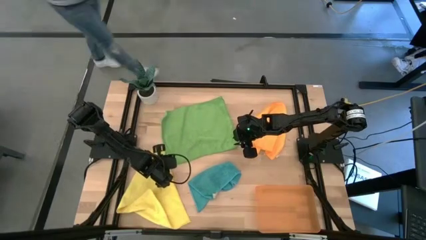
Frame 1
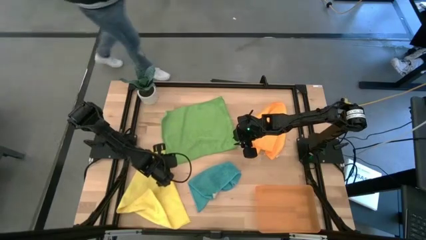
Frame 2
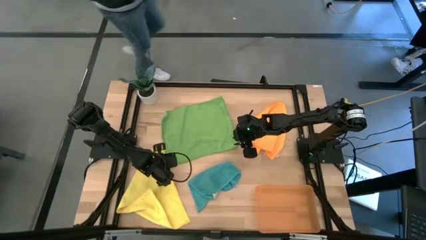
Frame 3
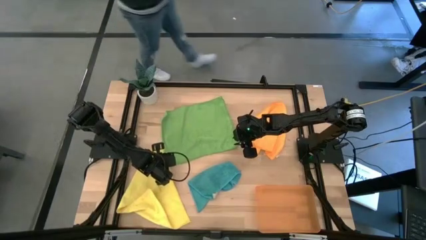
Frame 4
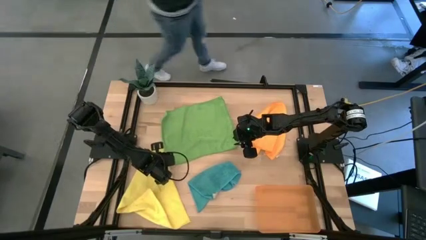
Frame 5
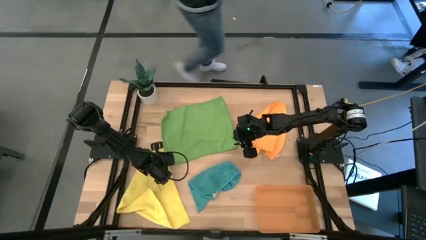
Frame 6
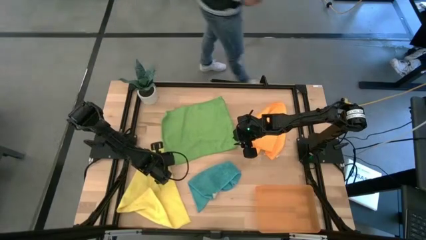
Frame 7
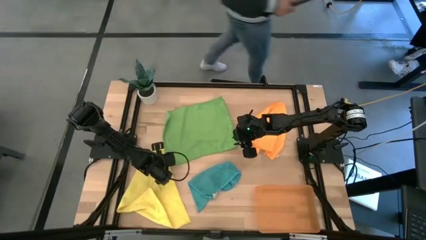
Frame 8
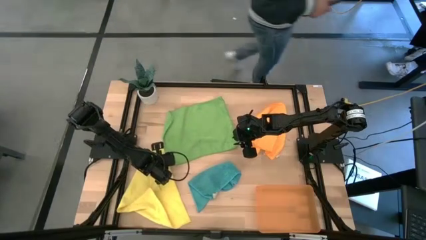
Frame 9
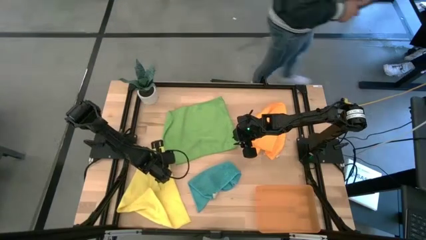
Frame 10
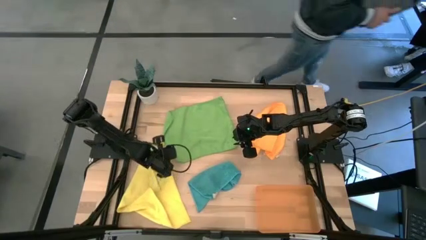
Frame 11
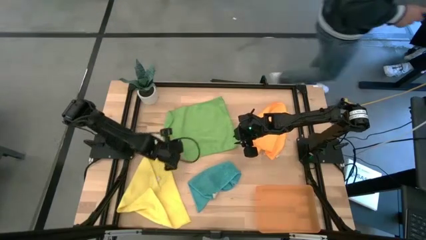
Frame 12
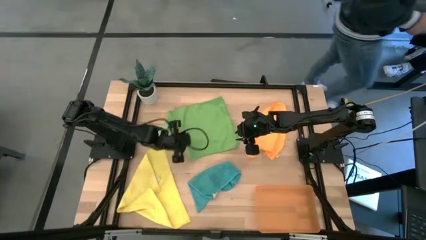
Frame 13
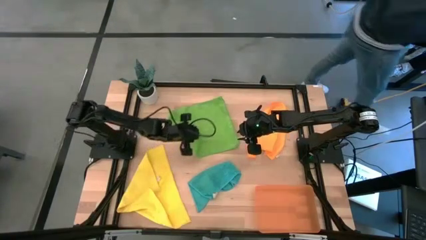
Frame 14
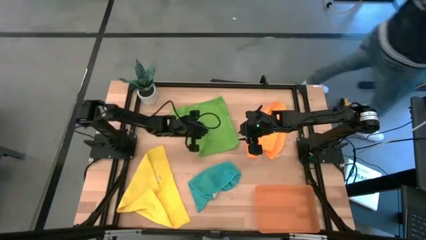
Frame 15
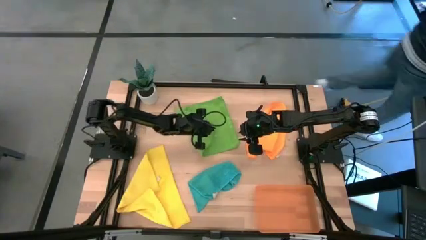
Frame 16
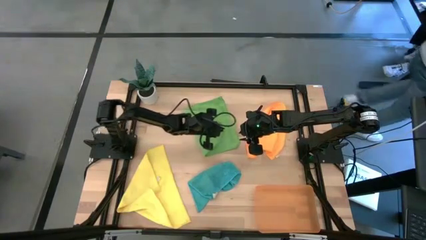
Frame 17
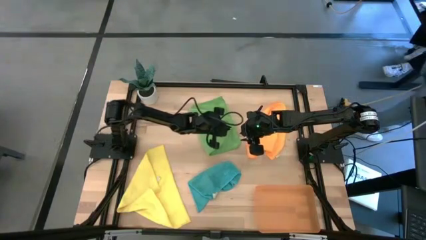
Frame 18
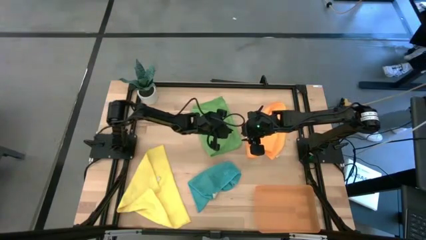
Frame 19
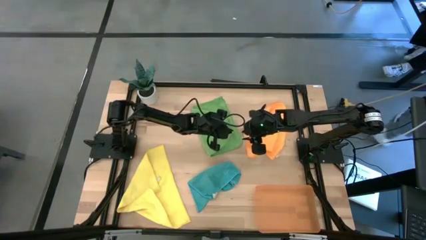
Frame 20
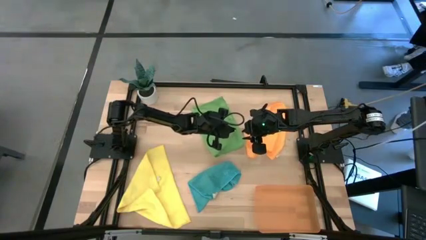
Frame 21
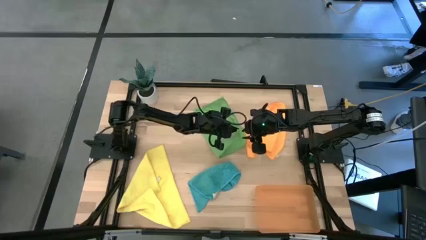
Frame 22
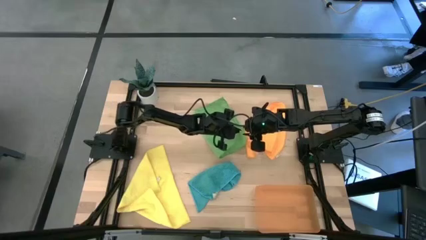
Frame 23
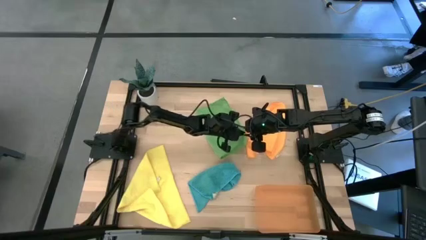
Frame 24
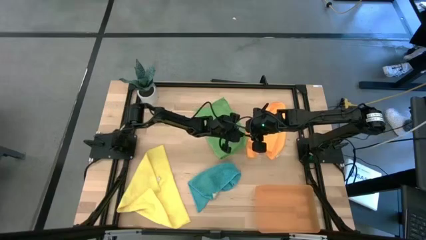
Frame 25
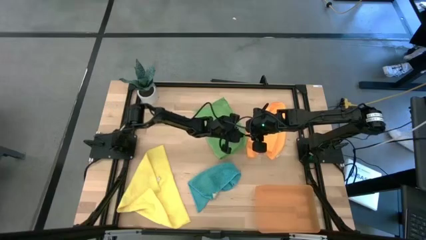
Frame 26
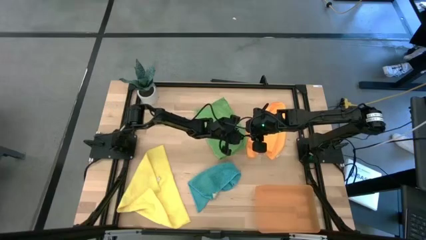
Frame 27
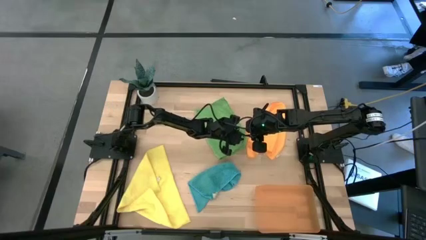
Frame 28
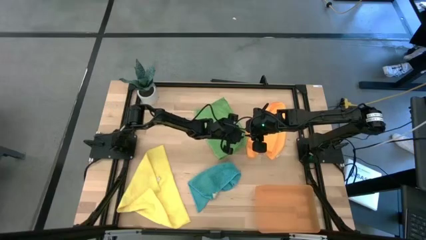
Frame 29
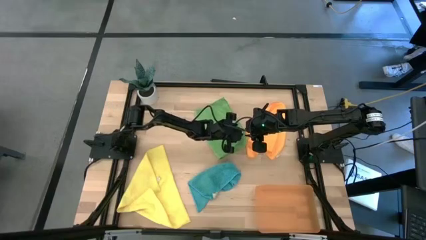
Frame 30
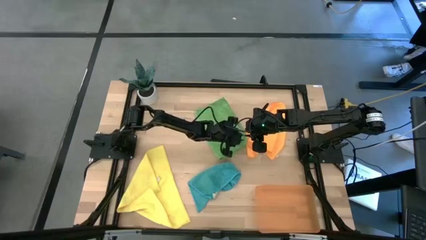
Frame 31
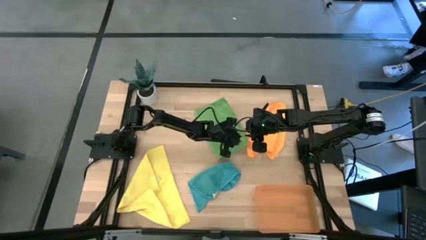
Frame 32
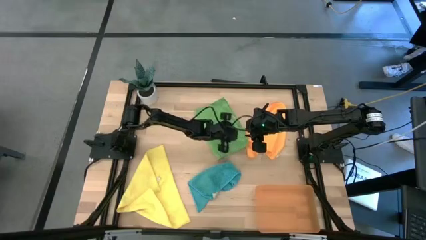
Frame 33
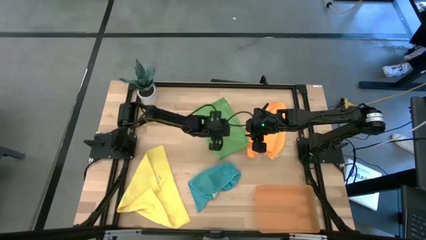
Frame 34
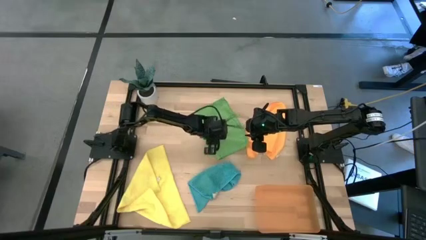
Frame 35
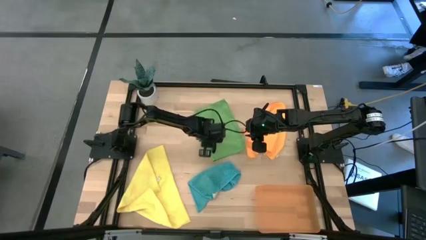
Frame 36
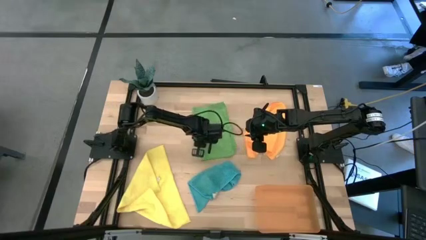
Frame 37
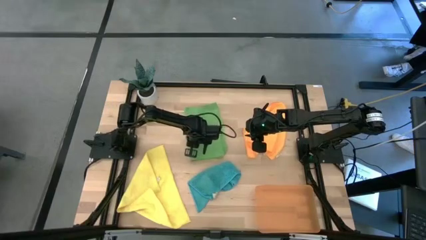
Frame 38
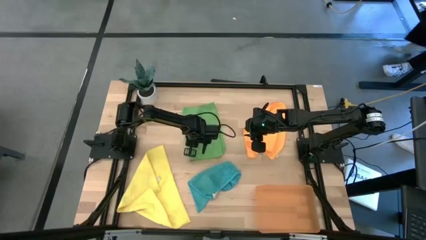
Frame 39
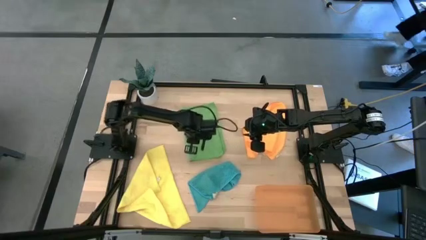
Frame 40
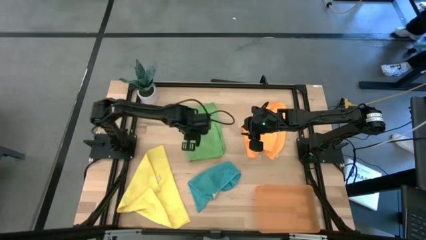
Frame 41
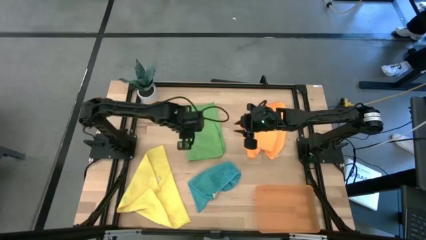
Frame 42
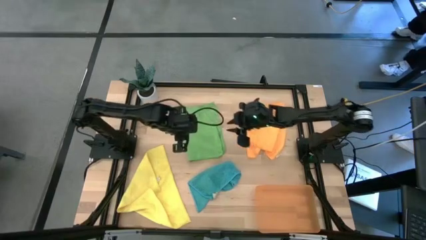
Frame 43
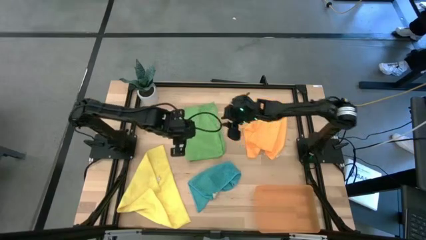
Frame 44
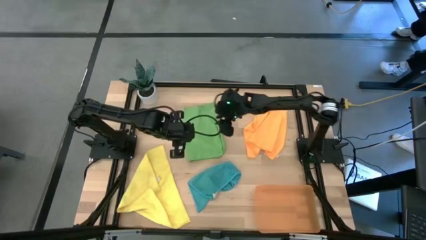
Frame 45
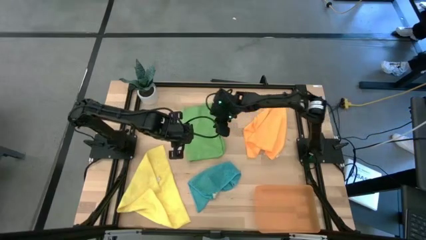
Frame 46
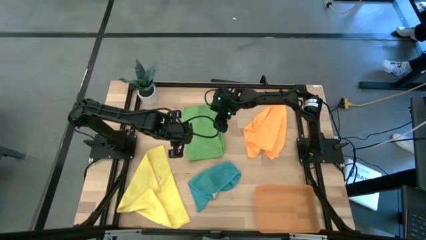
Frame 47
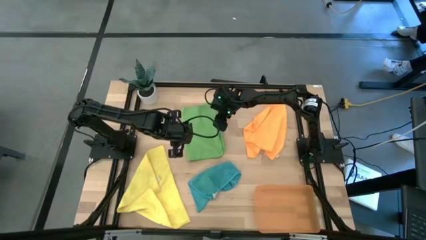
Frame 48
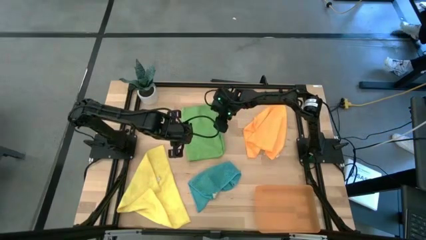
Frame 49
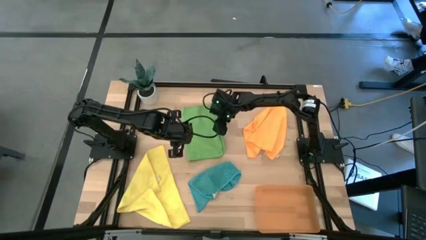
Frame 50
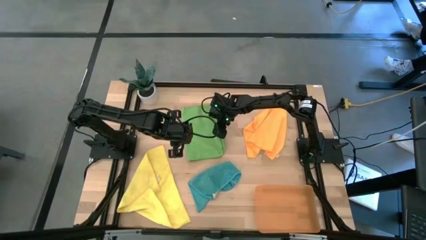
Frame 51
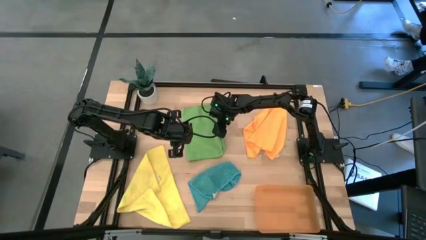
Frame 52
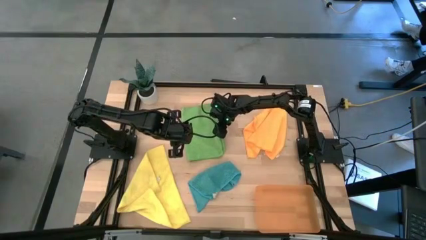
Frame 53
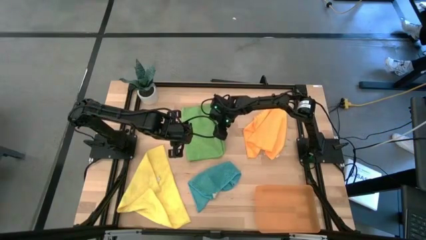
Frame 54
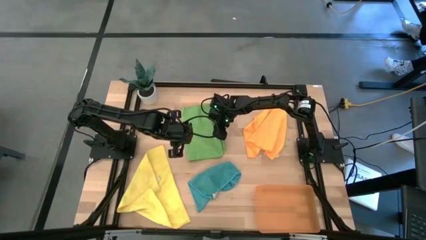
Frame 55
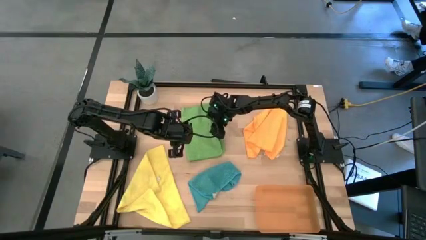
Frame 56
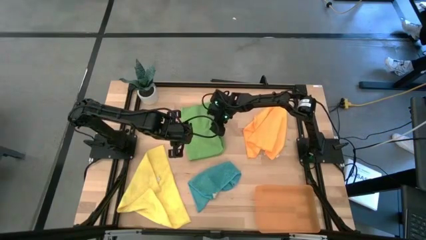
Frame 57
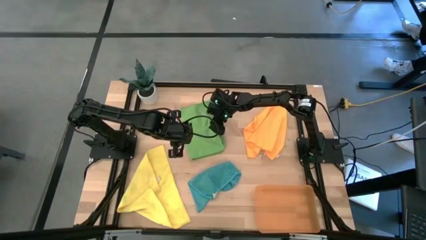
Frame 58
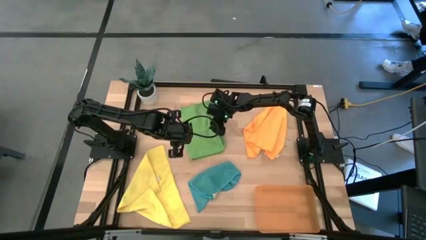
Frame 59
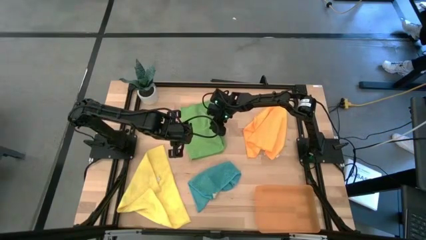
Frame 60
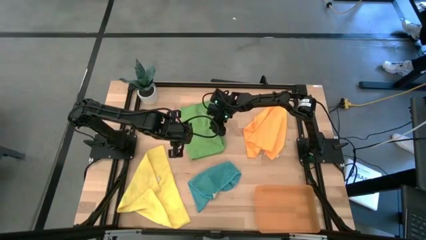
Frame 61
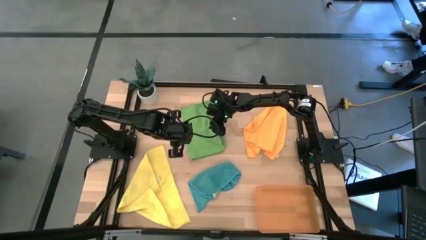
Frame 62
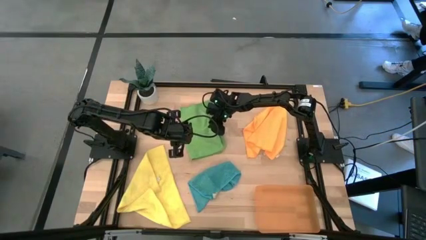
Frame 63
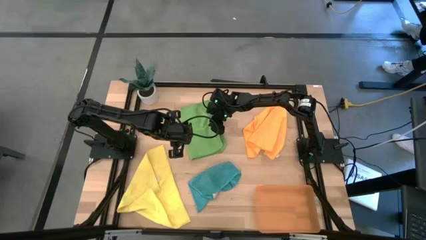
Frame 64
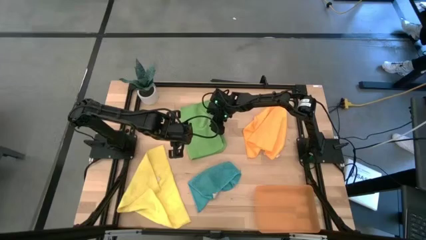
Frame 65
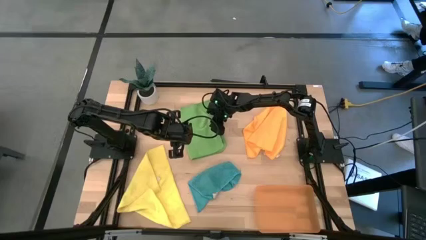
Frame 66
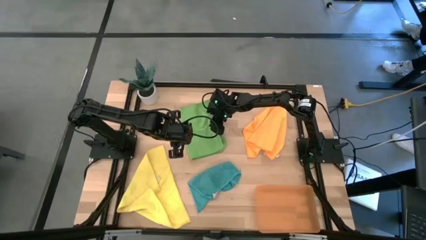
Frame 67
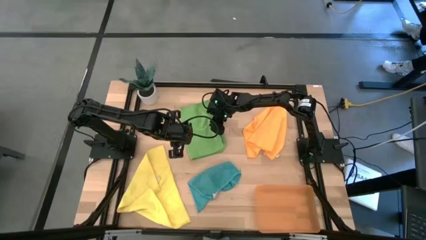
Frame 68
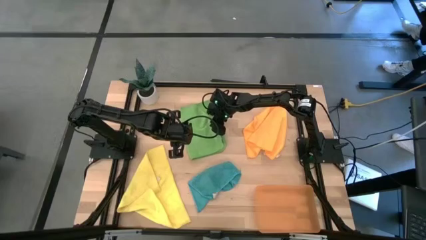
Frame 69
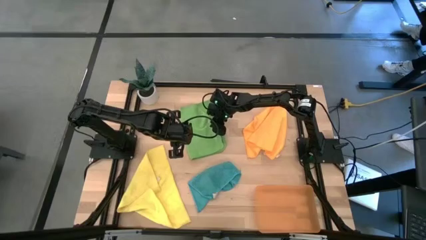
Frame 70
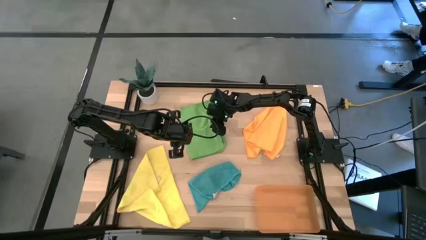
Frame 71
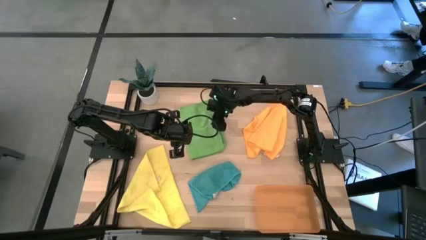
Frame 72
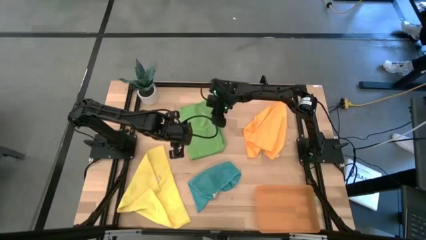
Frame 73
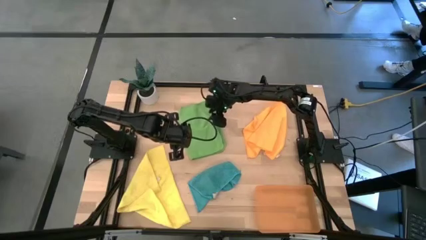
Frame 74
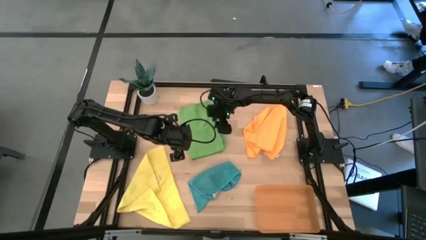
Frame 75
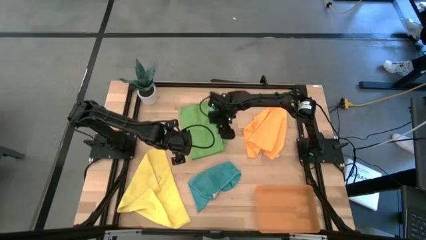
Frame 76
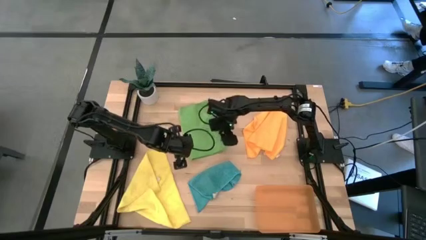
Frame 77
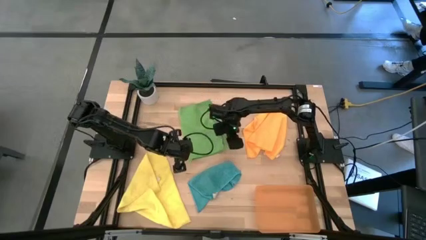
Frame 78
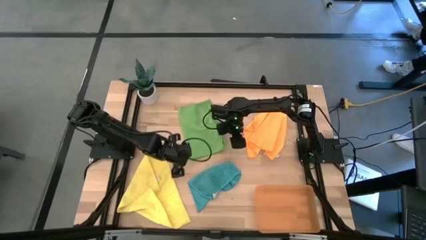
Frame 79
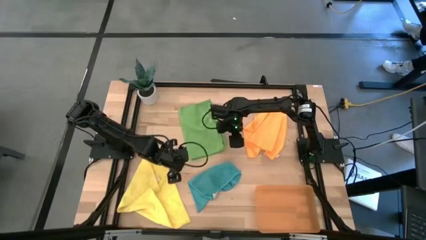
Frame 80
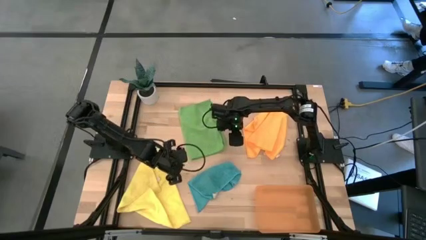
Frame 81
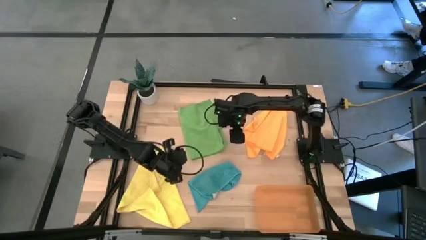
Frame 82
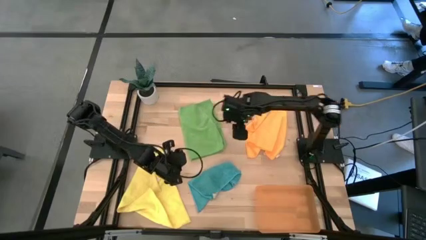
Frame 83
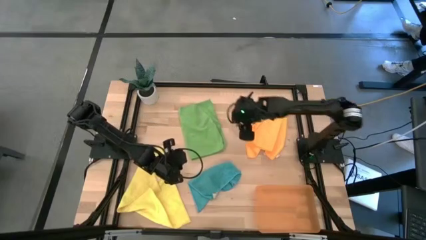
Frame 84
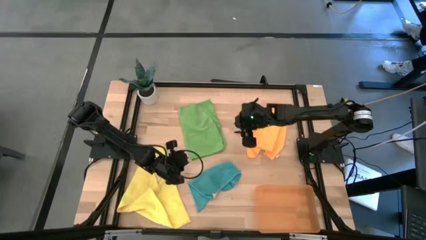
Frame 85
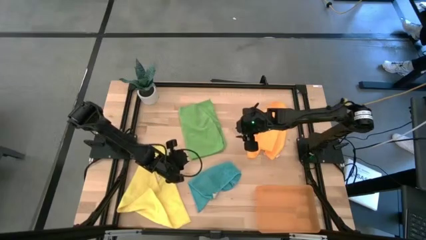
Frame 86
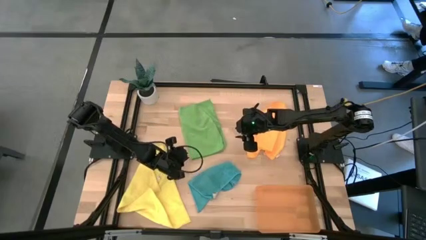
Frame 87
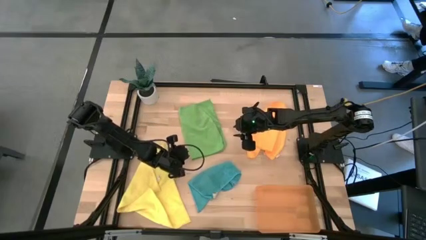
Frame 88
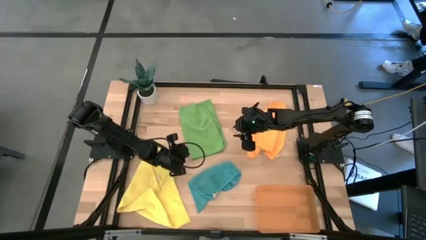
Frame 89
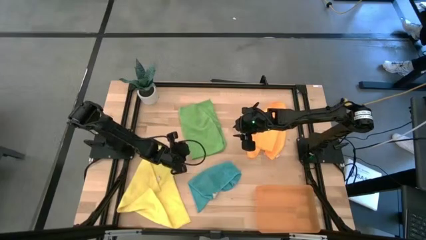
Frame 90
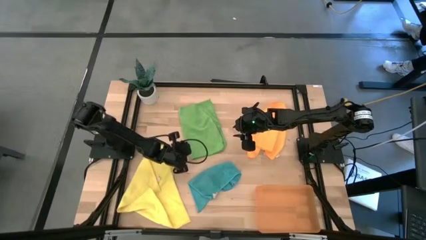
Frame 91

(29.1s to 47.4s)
Task: Roll microfiber towels into tight, uniform cylinder then place into a basket
Roll the green microfiber towel
